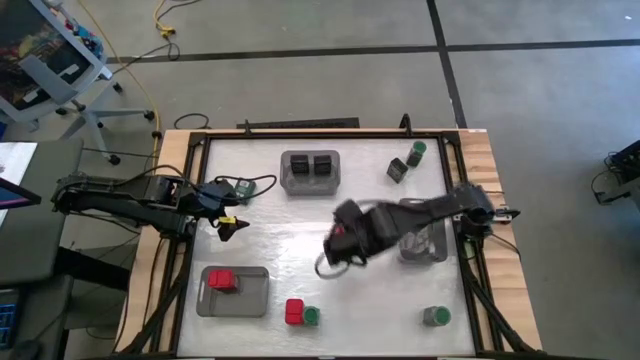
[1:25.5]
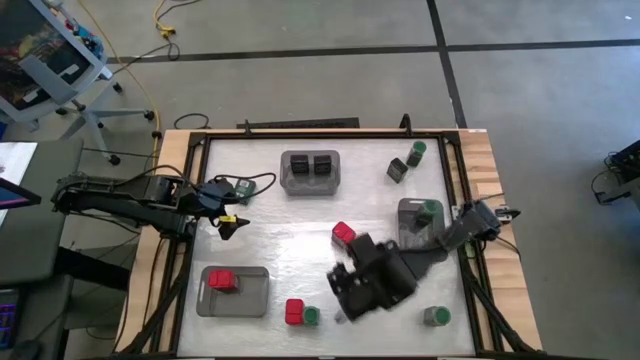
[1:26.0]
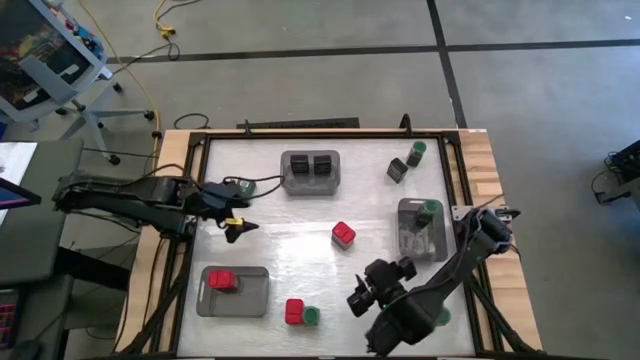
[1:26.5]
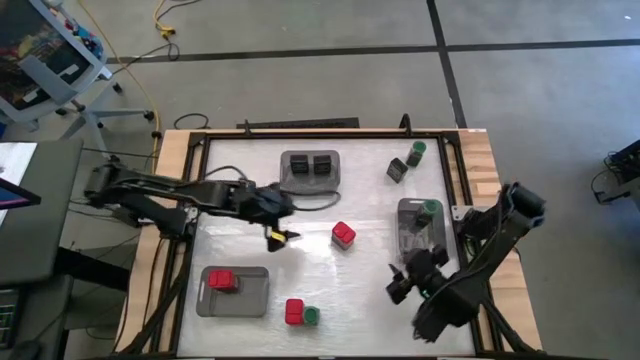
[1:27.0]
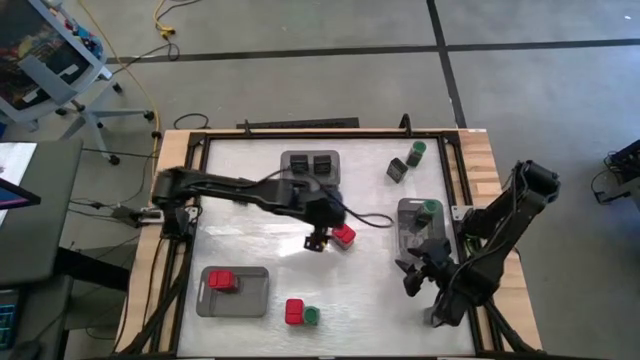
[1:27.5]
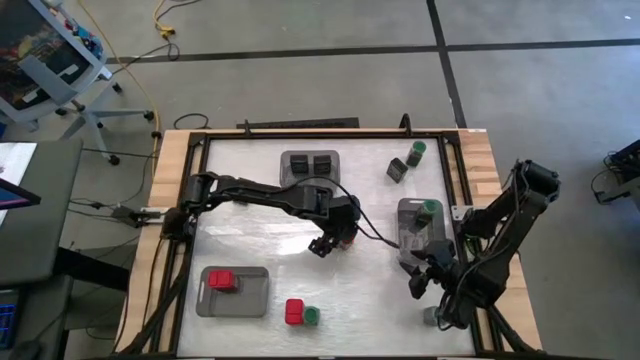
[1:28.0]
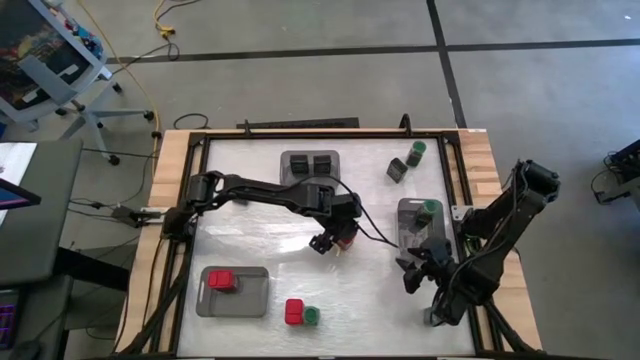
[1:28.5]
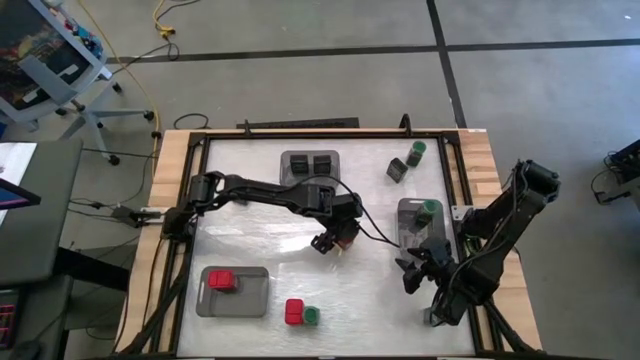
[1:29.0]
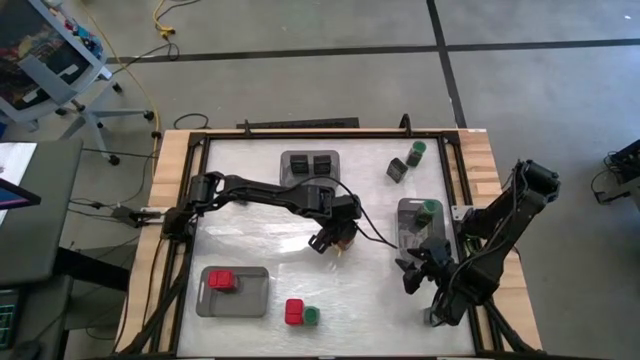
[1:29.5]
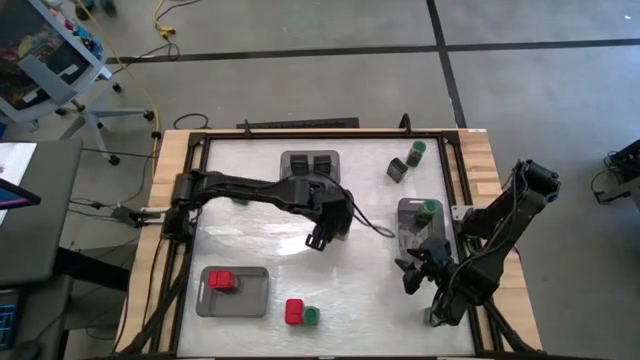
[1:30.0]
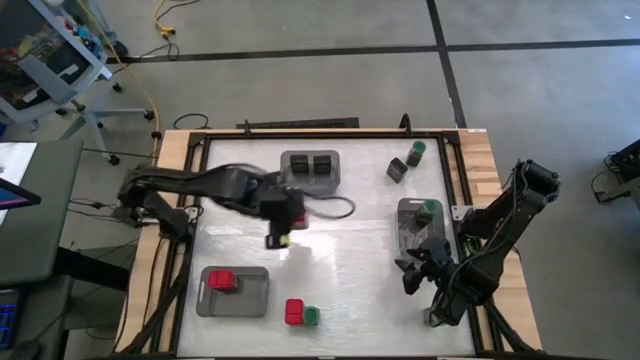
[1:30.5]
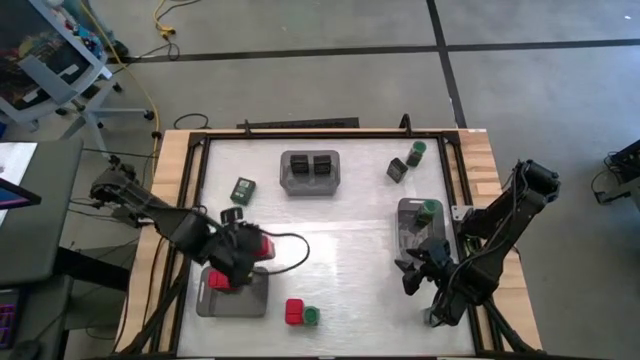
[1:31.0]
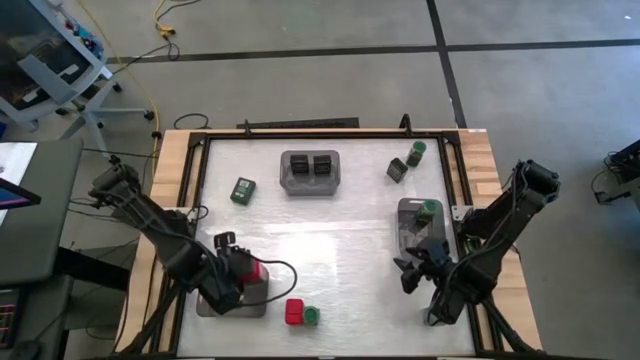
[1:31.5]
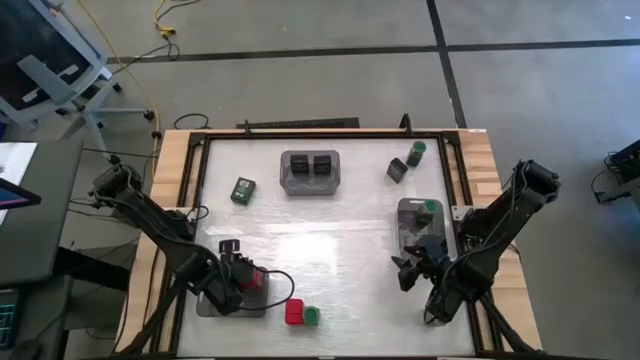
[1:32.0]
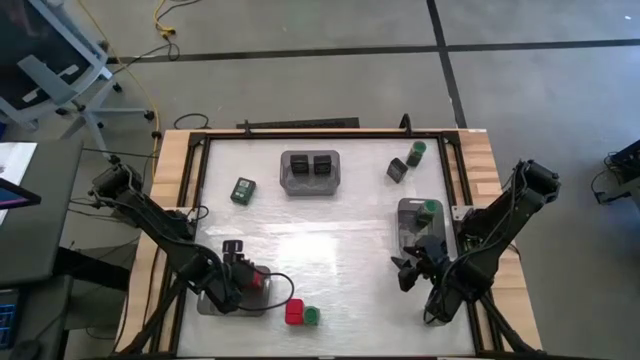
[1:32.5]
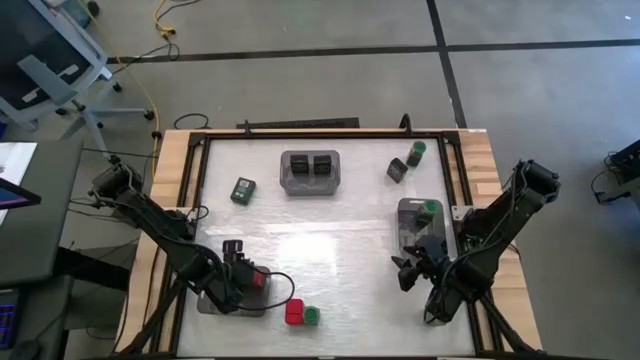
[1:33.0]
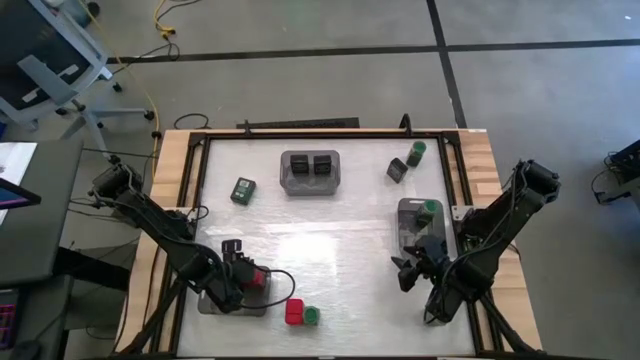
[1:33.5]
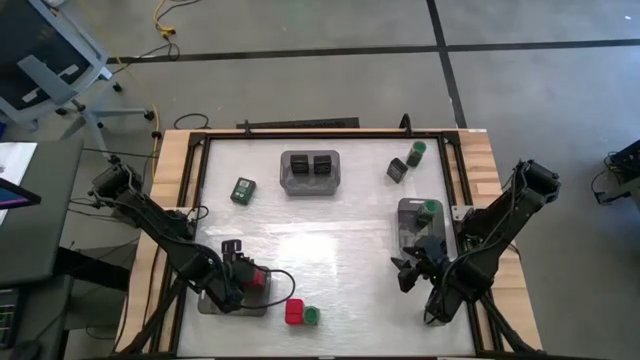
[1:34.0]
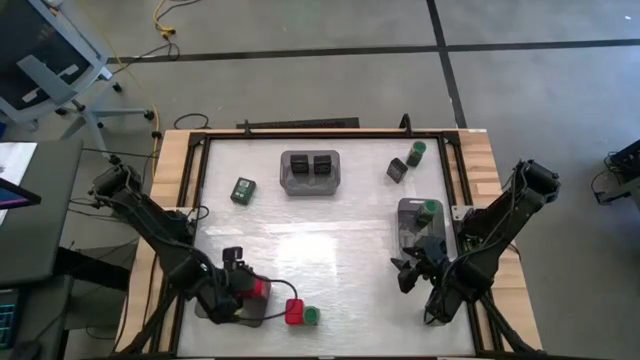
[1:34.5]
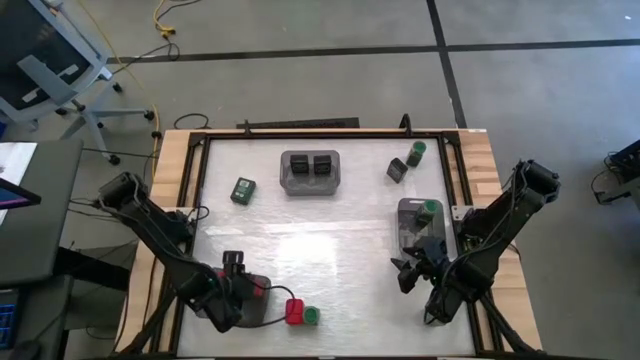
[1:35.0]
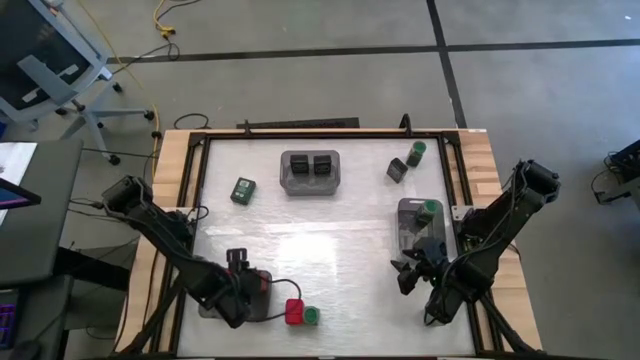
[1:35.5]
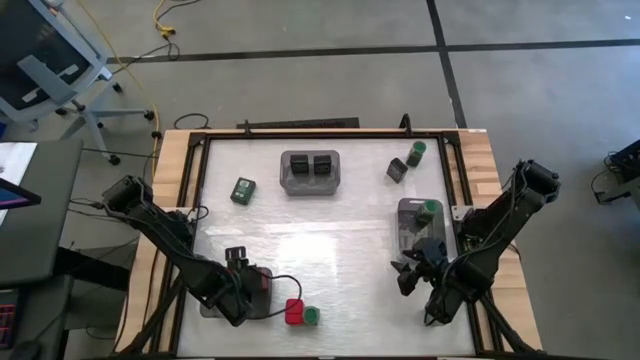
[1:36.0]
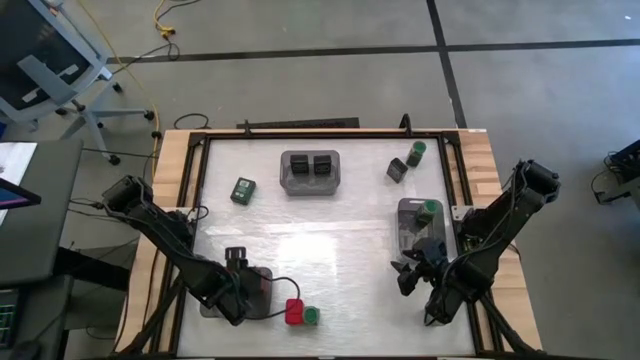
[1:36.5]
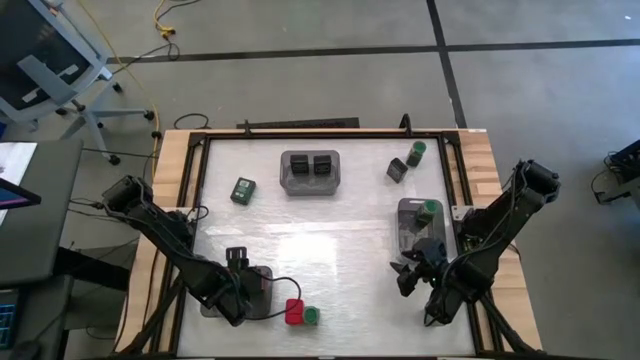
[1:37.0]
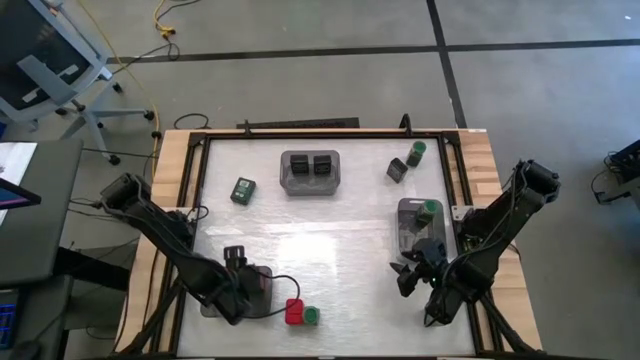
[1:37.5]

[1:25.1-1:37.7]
Task: Sort spices by type
Put the right red seasoning can into the bottom black transparent bin

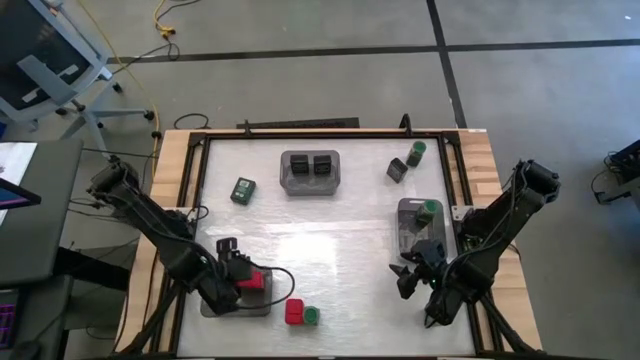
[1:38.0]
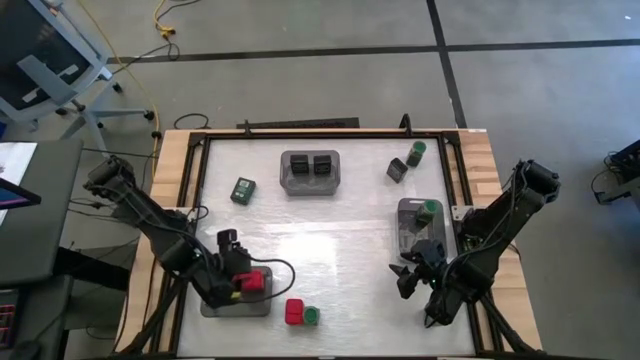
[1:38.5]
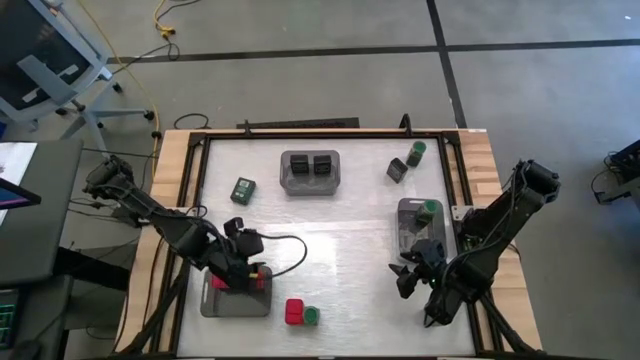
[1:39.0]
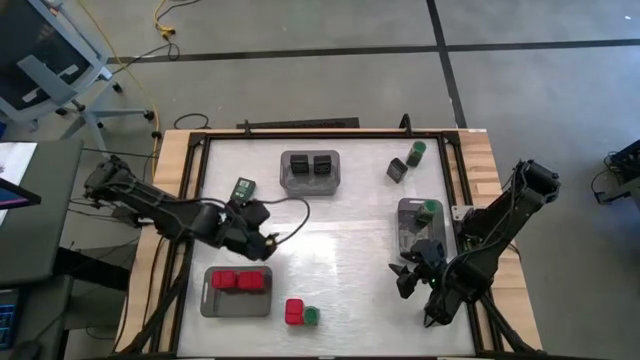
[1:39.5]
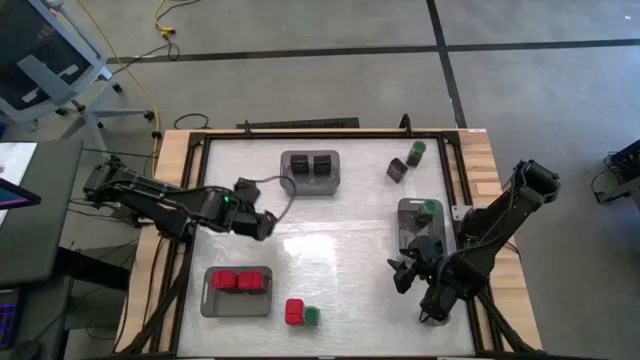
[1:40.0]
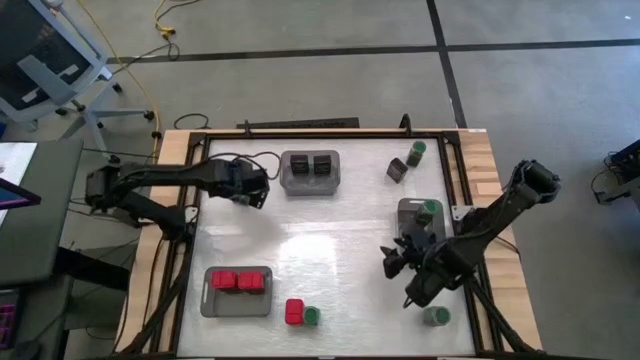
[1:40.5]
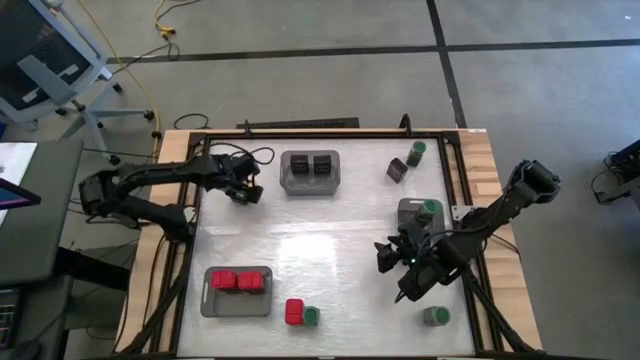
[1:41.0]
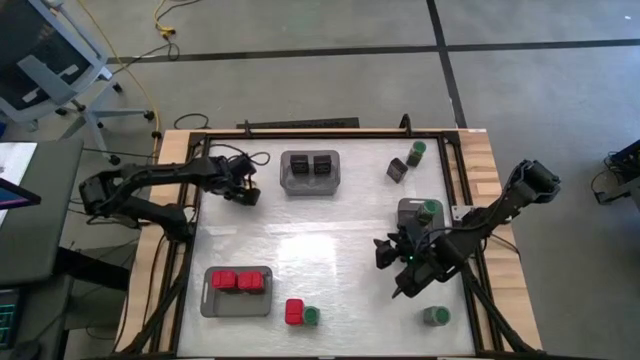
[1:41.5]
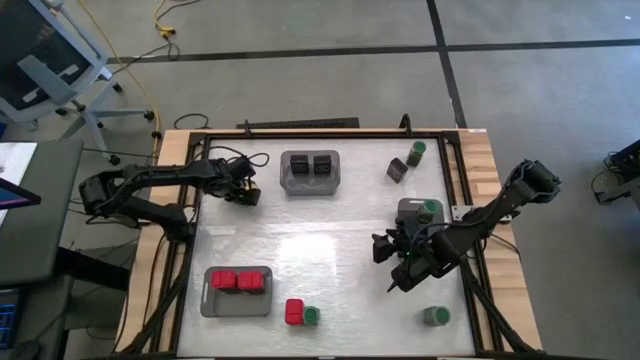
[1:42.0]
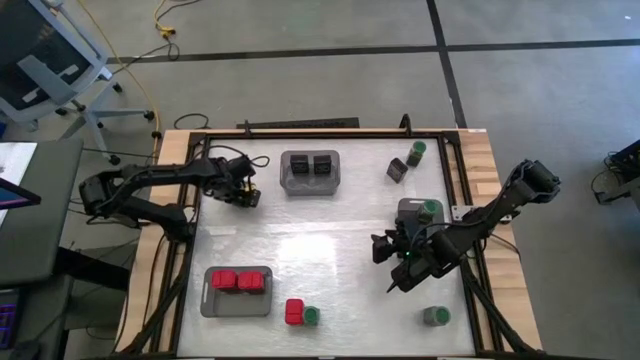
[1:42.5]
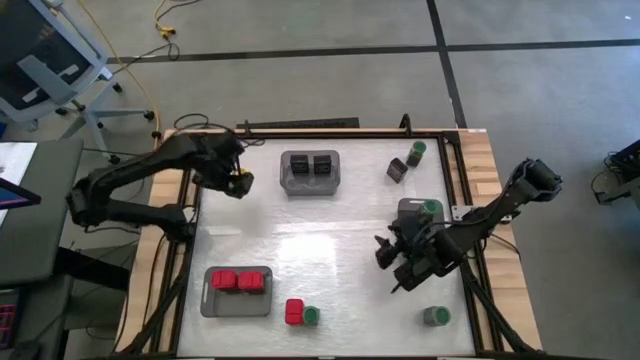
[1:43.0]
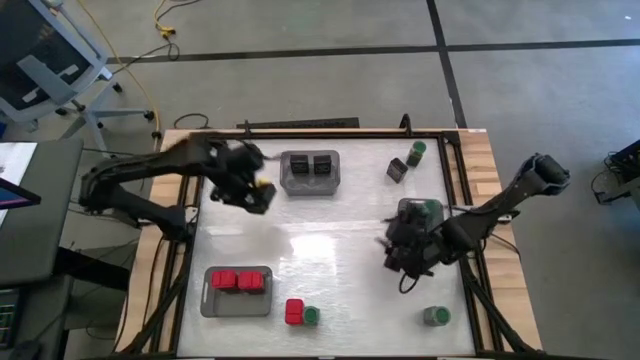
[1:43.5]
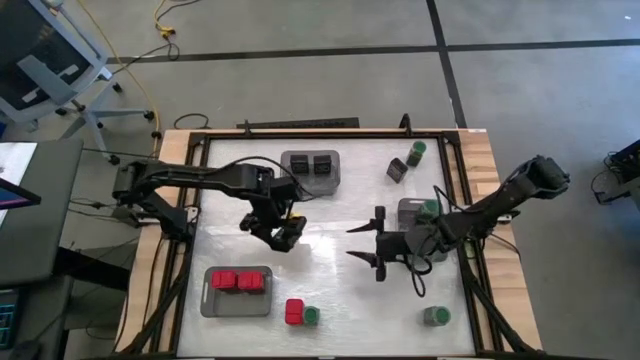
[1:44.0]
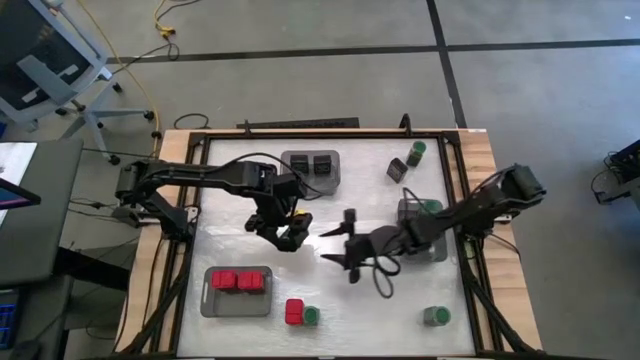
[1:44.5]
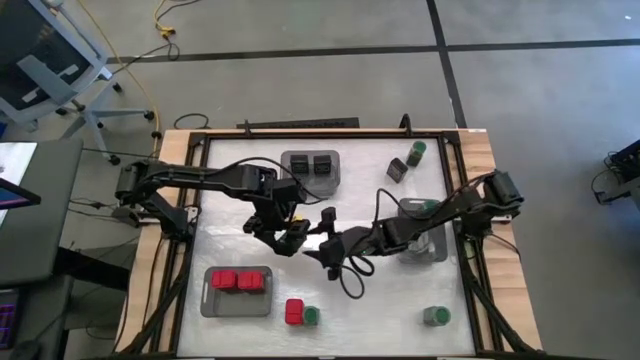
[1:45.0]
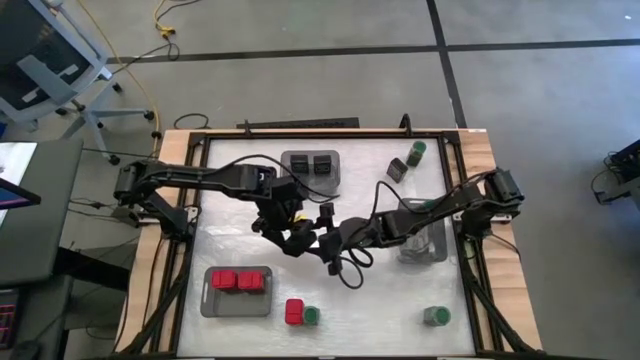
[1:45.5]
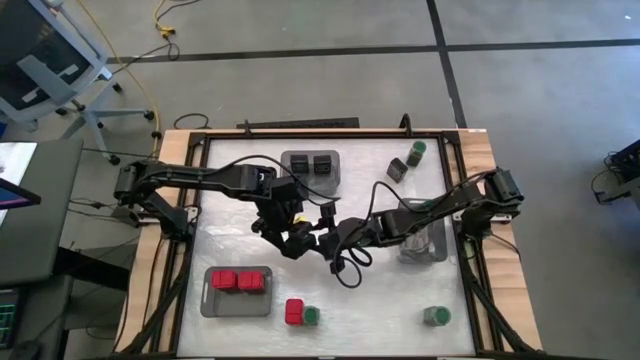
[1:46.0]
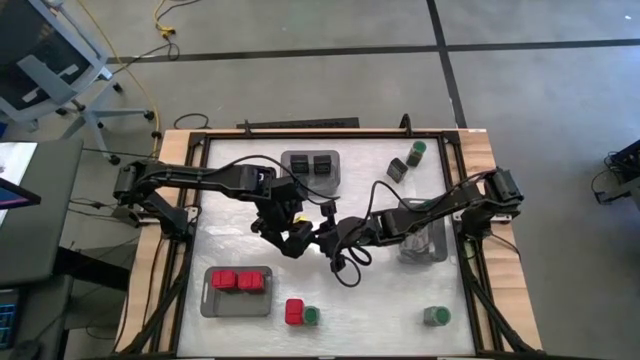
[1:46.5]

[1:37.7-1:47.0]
Put the left black seasoning can into the top black transparent bin
